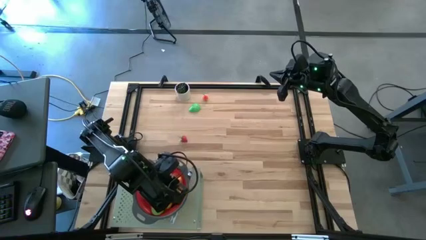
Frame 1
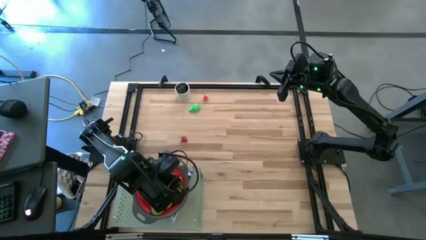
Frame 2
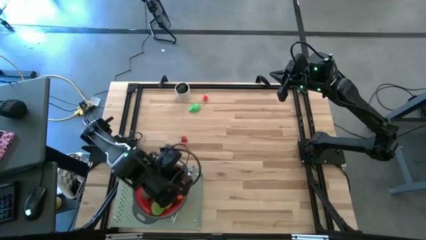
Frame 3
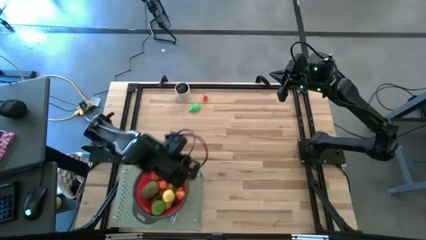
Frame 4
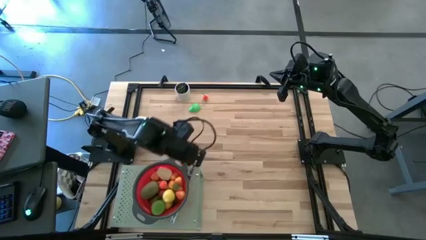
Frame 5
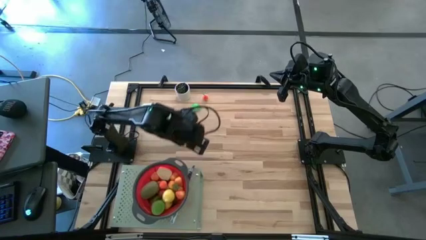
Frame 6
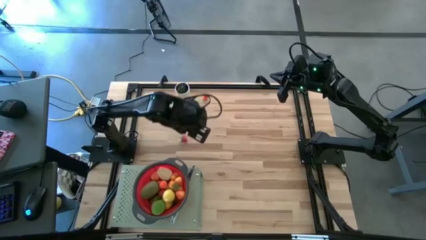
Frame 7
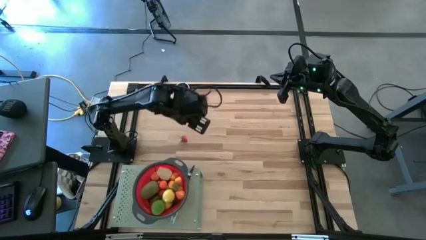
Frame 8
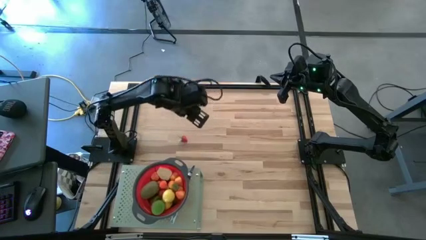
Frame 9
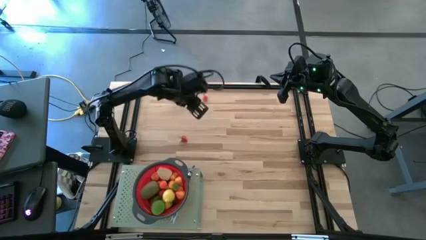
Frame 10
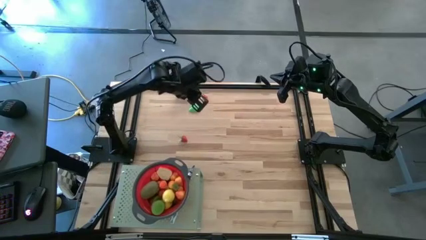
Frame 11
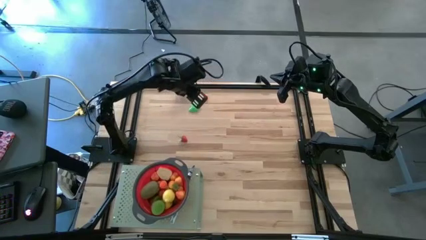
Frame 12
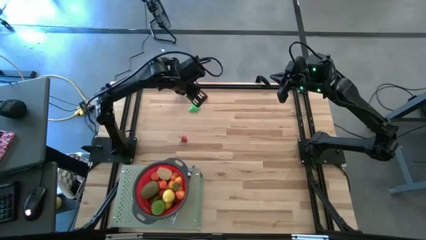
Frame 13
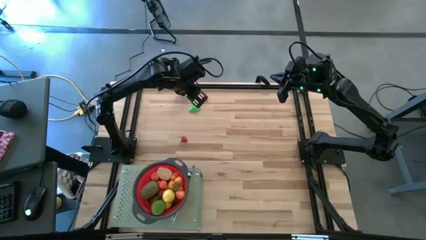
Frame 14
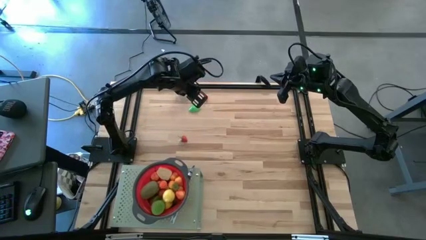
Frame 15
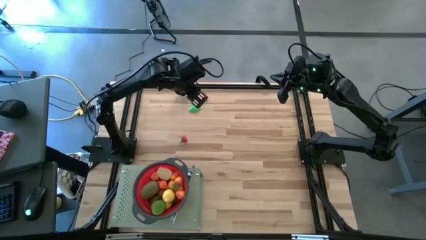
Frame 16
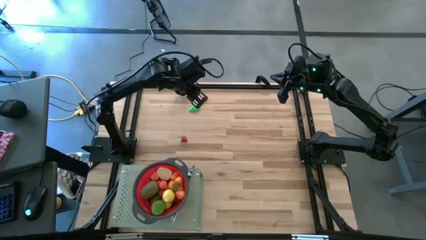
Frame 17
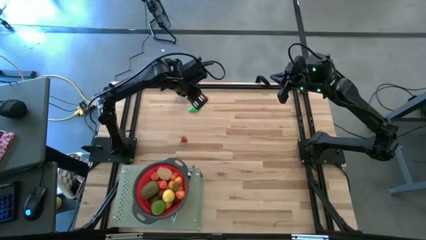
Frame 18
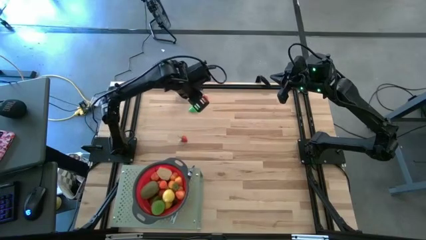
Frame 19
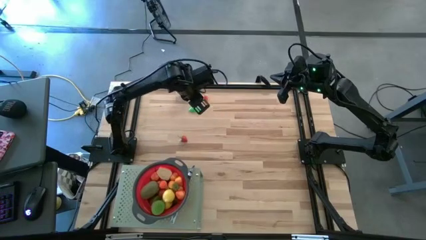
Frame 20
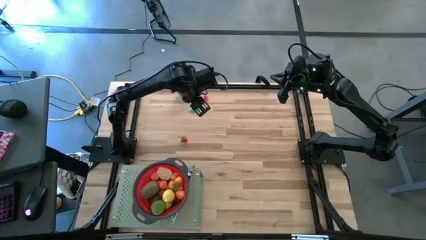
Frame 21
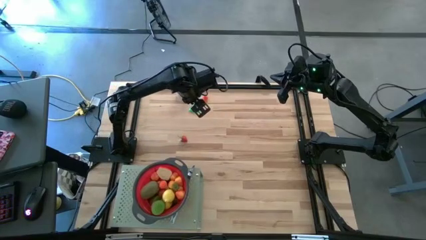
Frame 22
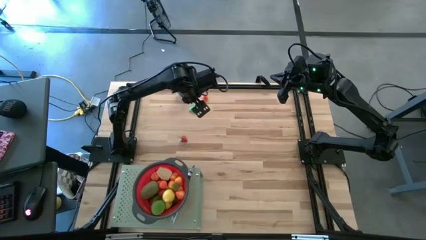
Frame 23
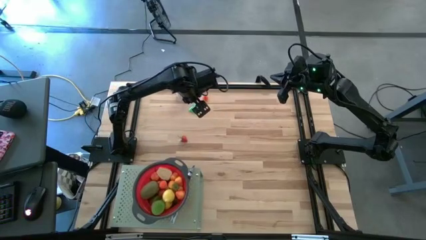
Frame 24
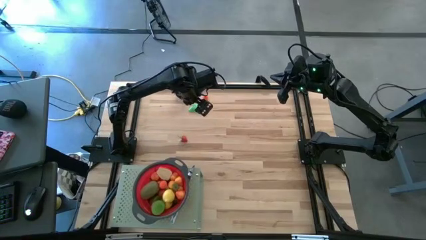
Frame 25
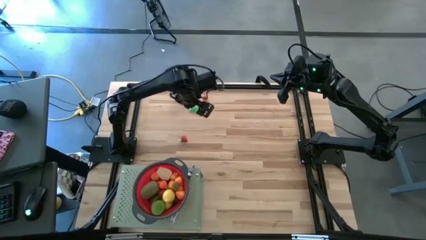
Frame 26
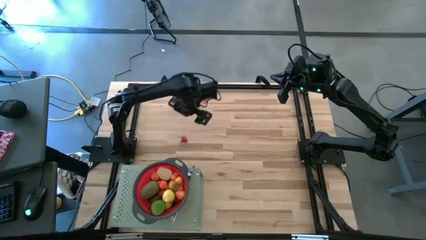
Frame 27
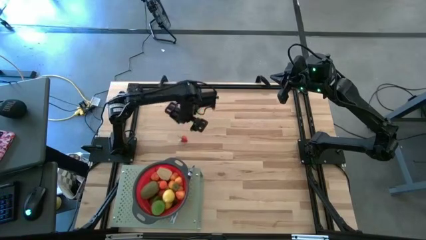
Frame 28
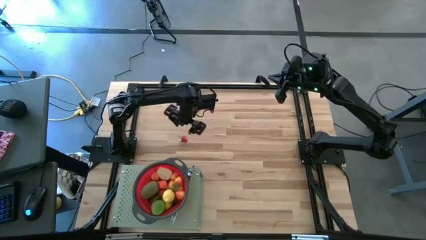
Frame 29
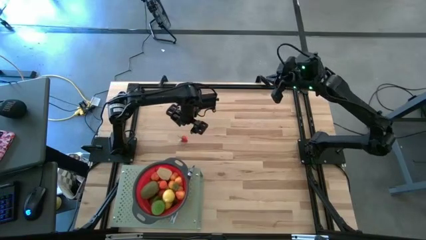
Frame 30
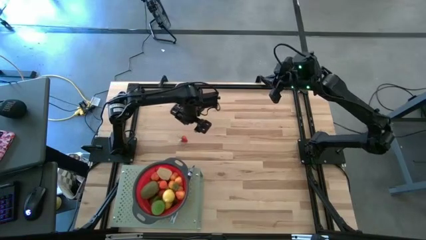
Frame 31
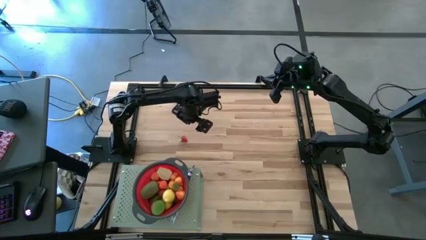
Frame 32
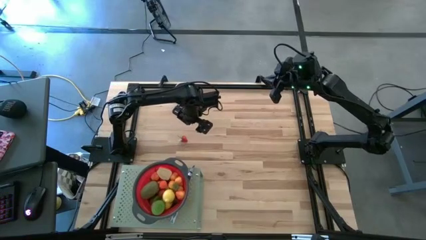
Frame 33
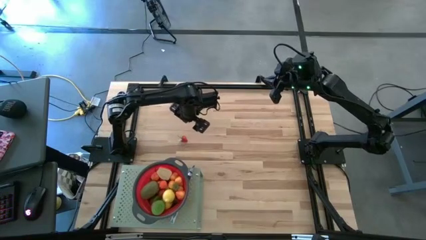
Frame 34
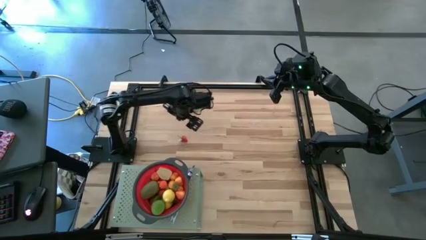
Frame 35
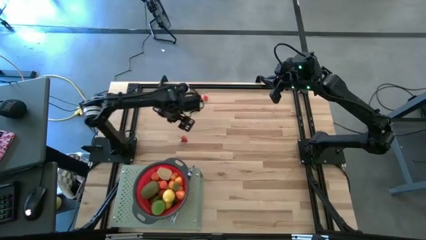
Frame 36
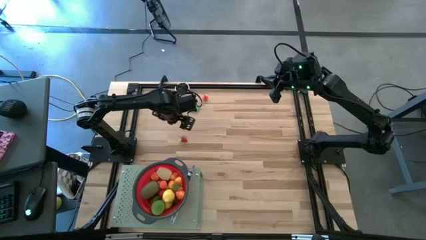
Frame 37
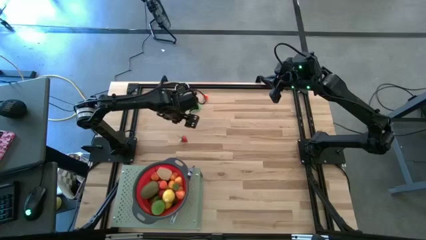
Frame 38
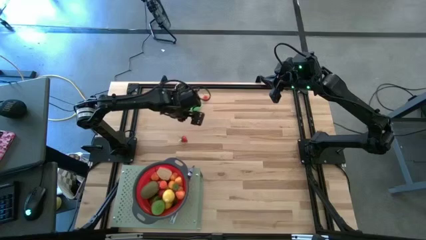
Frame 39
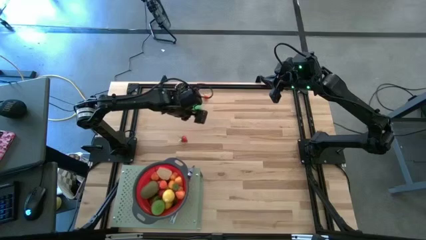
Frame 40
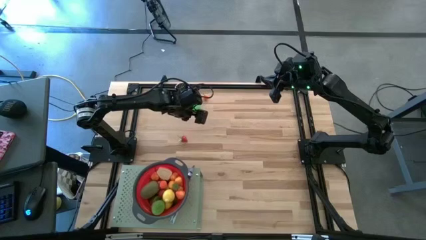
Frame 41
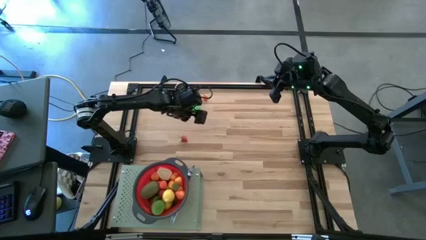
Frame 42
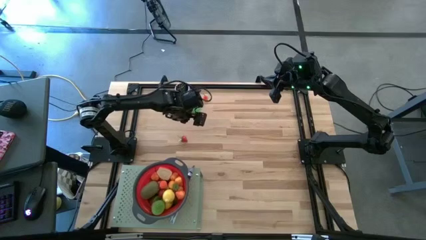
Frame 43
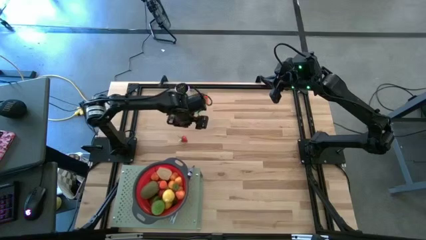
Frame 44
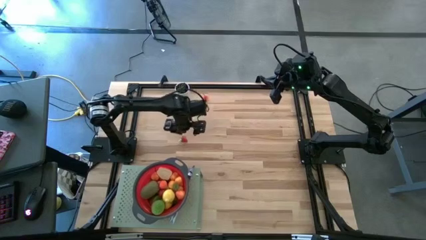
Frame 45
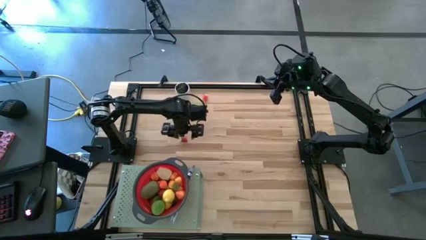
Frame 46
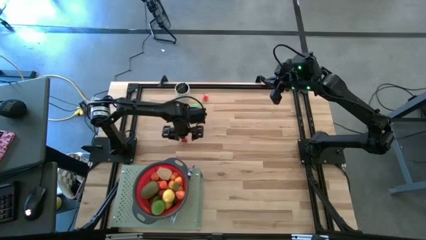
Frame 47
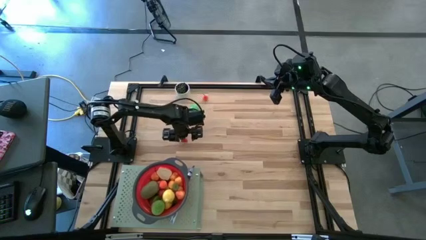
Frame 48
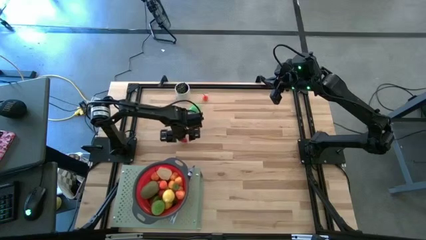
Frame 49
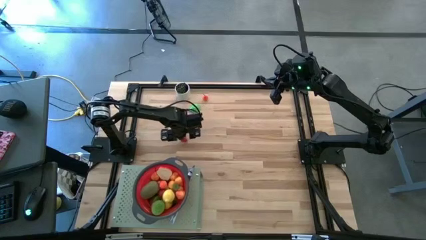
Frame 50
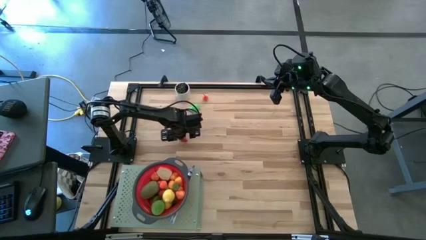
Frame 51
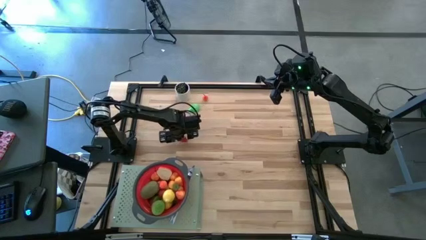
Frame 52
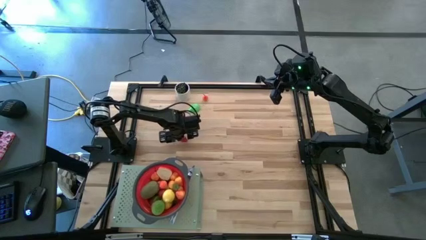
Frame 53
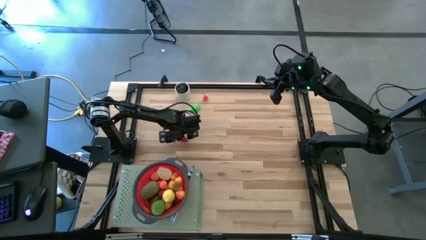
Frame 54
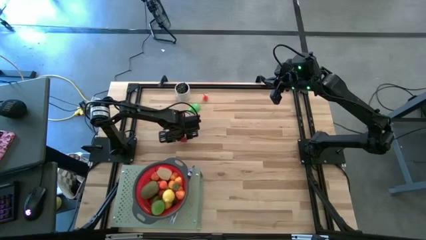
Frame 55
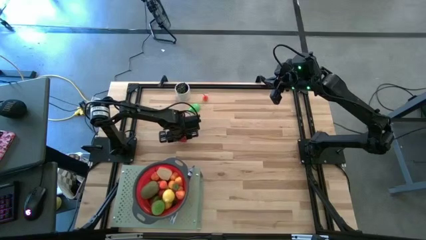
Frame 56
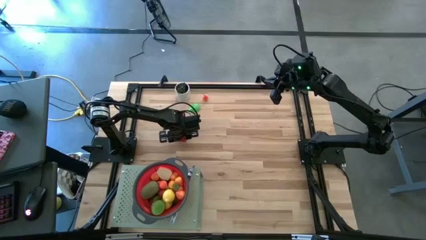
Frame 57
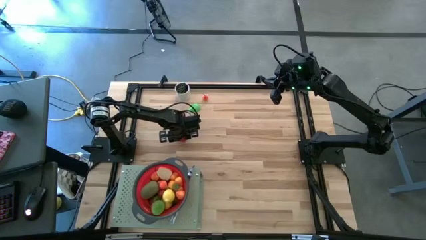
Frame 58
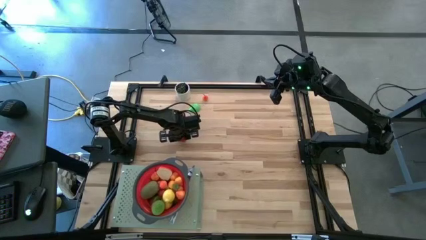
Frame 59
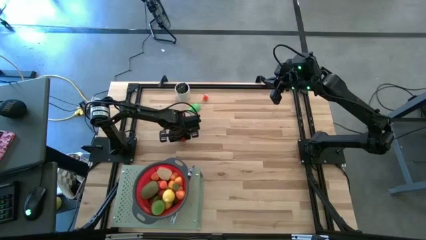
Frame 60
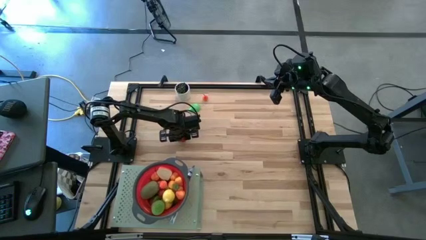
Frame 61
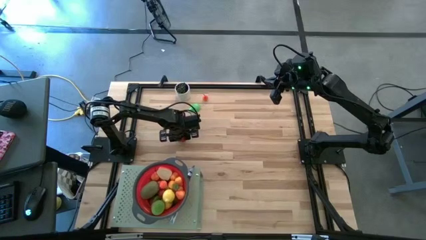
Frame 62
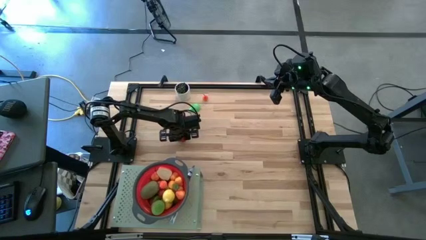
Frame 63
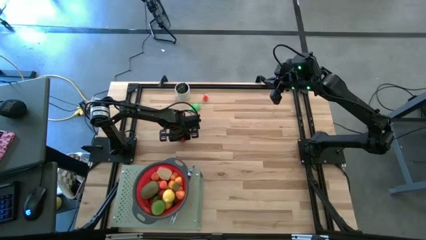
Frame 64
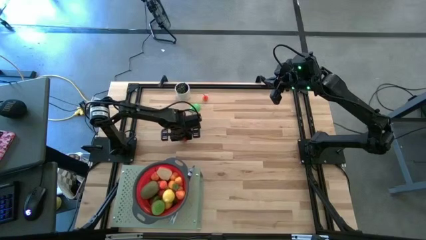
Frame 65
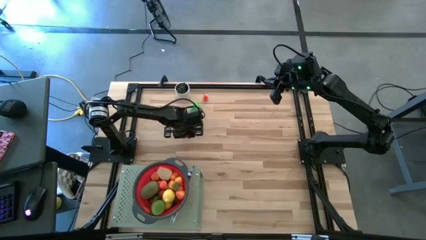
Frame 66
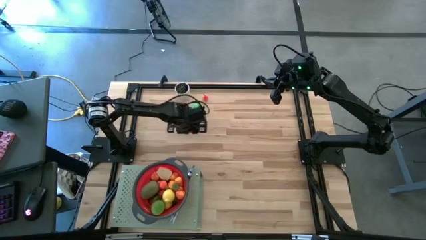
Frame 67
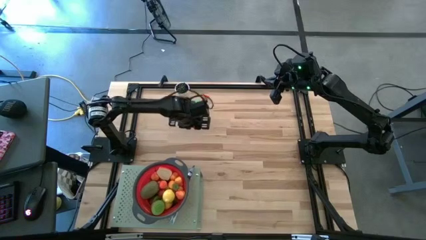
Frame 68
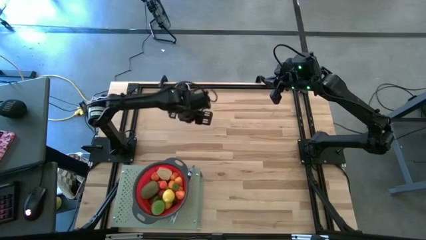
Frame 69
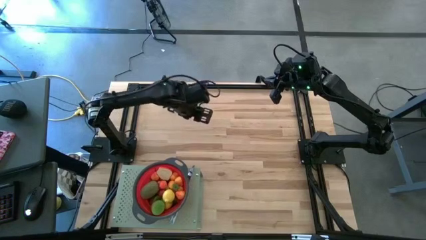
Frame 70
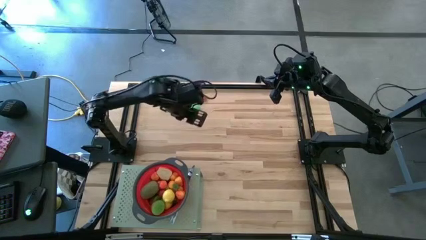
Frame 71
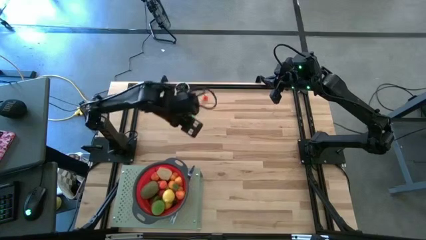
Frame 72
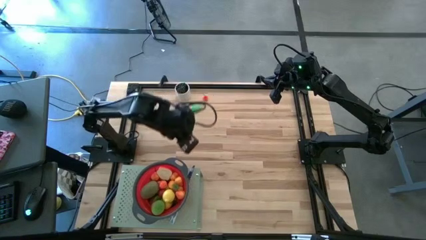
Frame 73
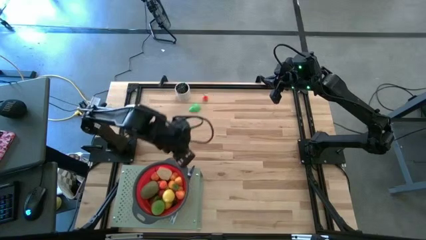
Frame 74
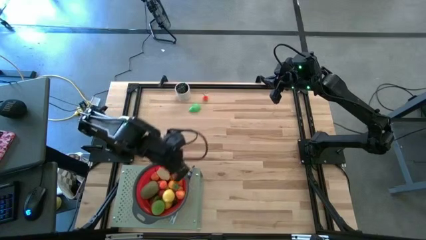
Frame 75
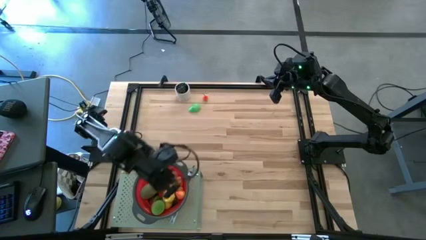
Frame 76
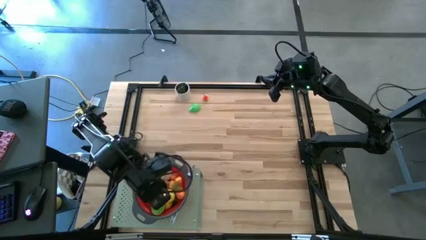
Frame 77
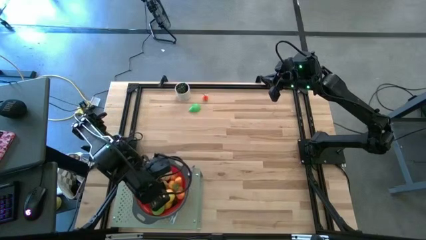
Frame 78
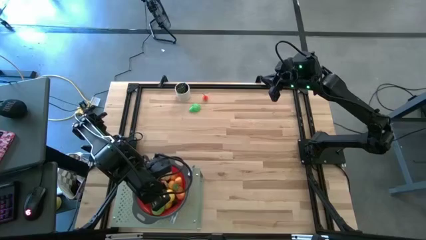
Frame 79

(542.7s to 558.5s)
Task: Pick & Place Fruit
Put the strawberry into the red strainer bowl on the shelf
